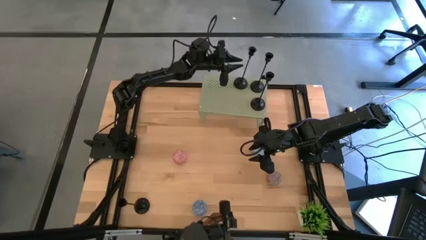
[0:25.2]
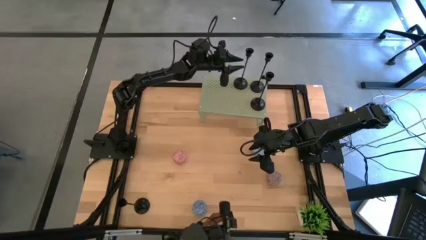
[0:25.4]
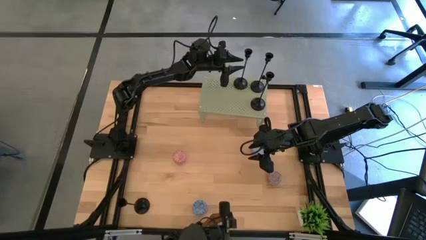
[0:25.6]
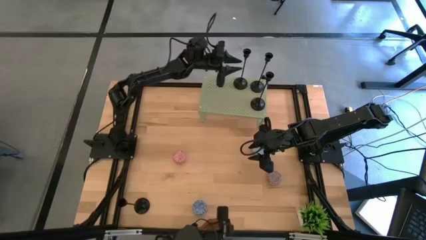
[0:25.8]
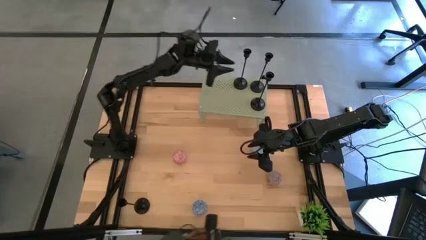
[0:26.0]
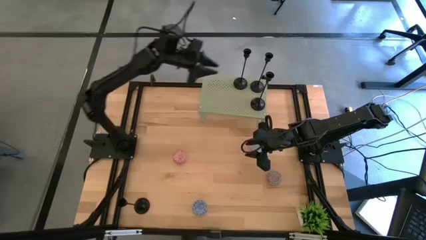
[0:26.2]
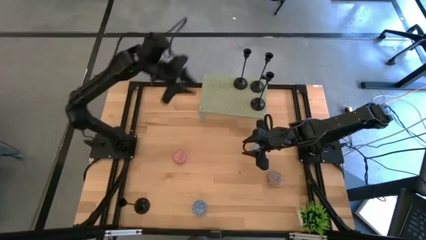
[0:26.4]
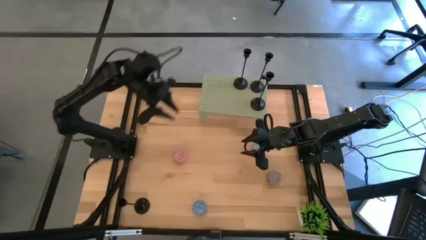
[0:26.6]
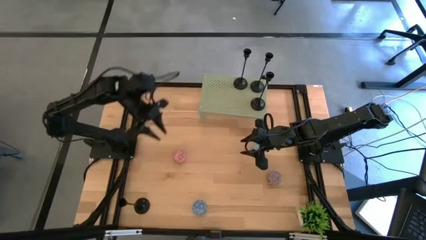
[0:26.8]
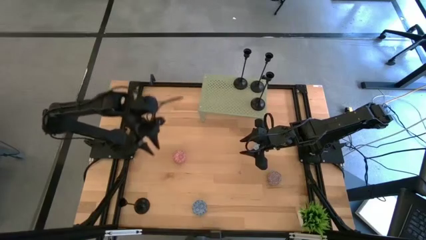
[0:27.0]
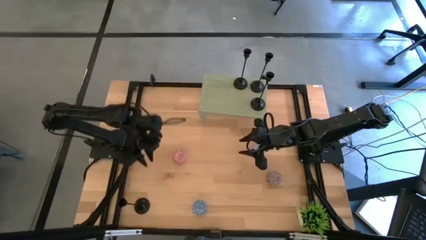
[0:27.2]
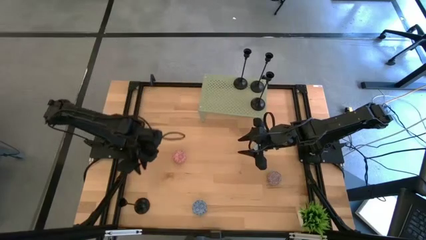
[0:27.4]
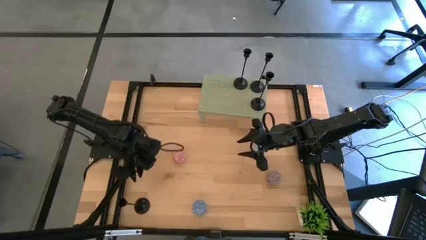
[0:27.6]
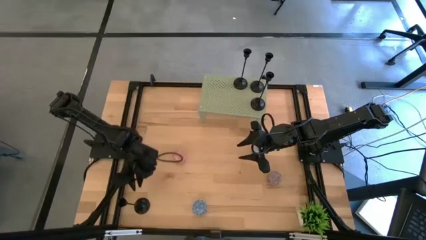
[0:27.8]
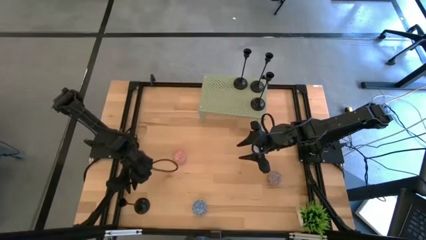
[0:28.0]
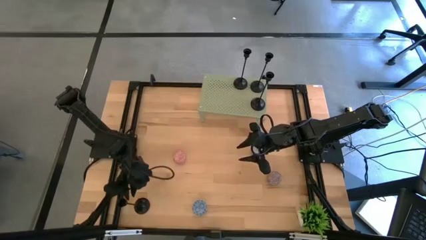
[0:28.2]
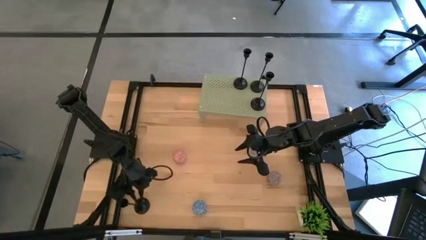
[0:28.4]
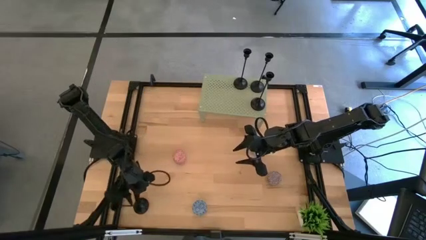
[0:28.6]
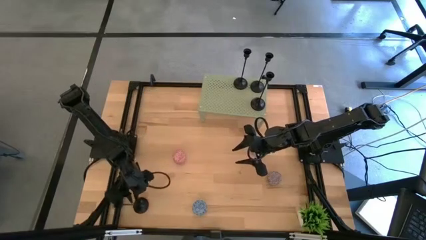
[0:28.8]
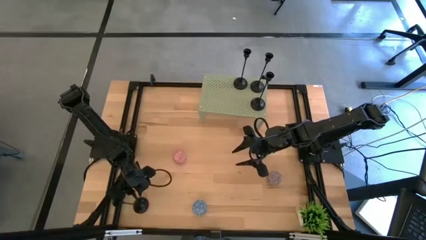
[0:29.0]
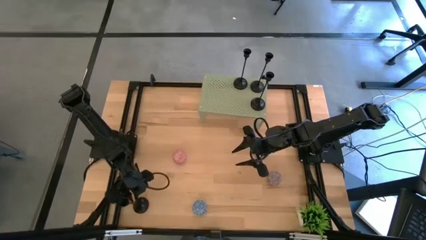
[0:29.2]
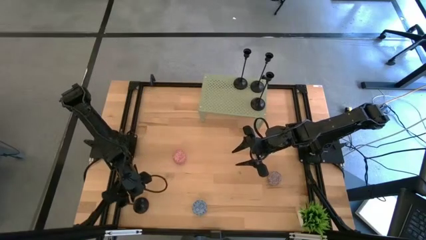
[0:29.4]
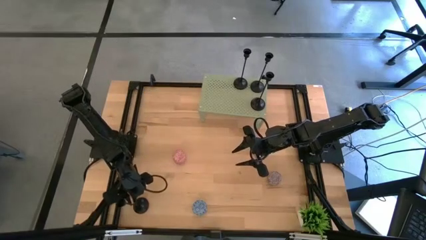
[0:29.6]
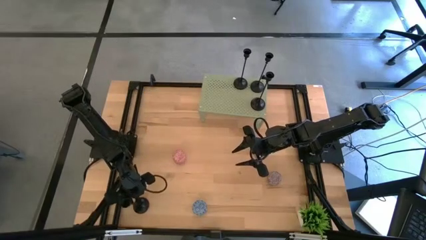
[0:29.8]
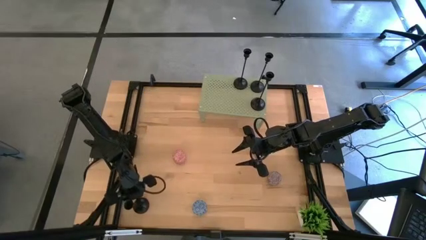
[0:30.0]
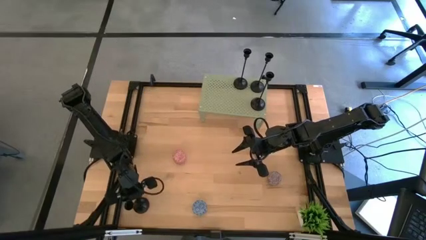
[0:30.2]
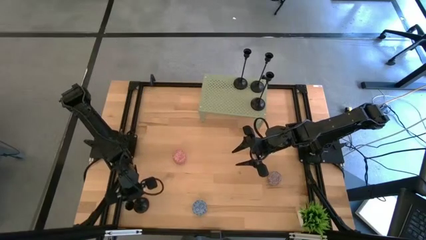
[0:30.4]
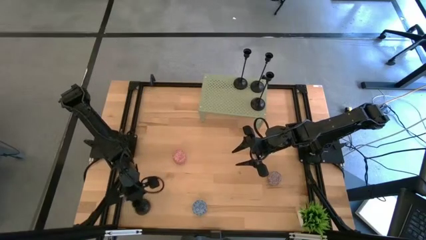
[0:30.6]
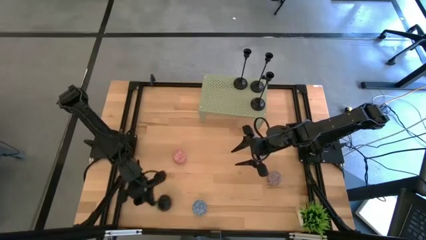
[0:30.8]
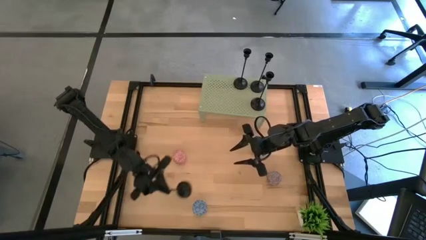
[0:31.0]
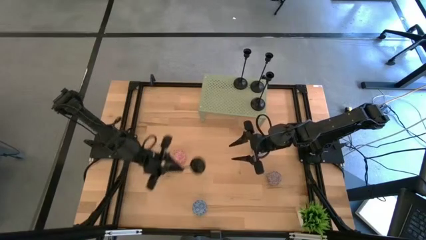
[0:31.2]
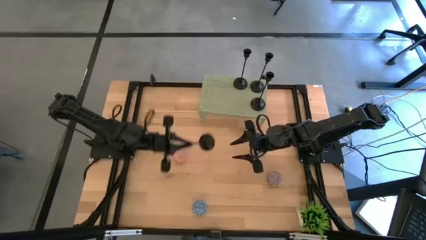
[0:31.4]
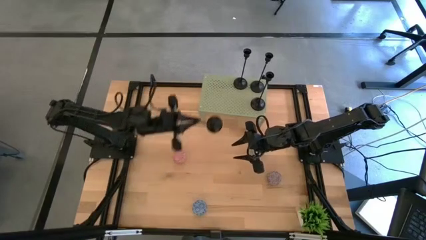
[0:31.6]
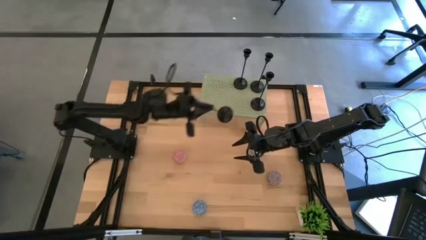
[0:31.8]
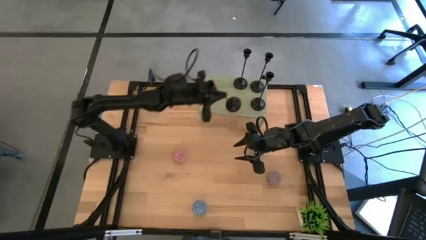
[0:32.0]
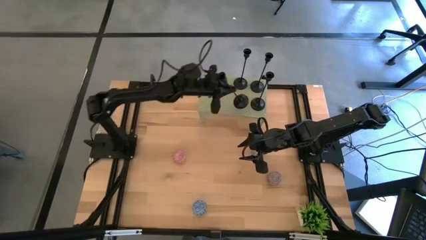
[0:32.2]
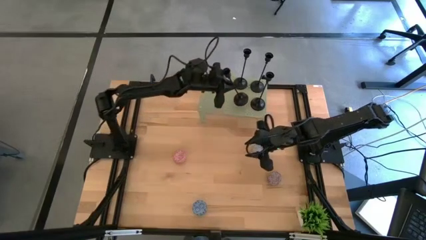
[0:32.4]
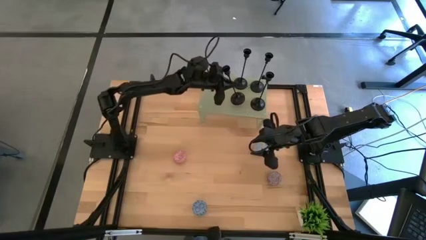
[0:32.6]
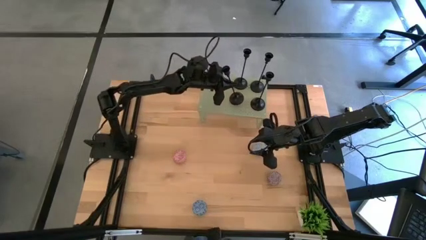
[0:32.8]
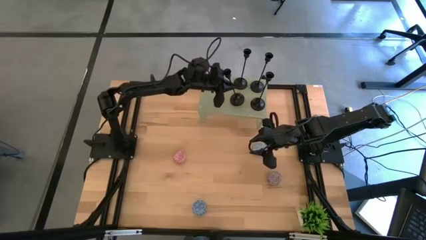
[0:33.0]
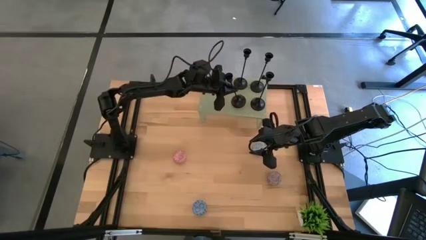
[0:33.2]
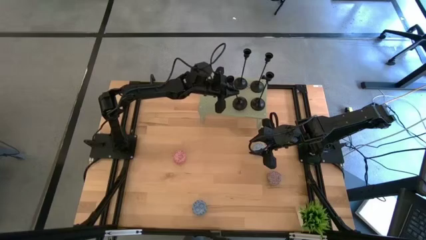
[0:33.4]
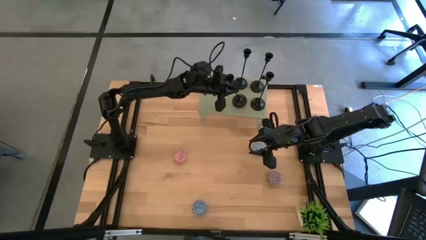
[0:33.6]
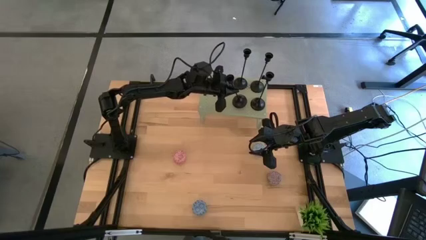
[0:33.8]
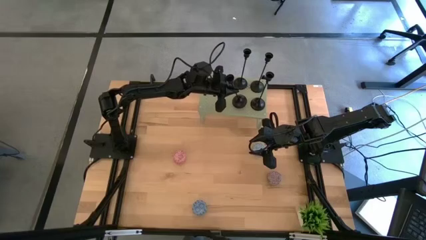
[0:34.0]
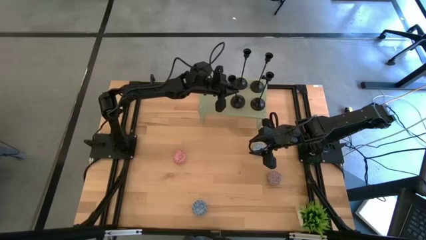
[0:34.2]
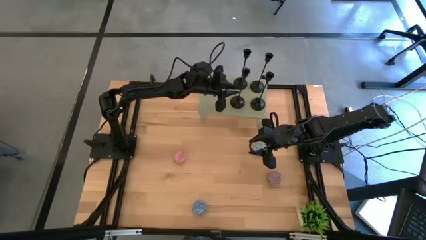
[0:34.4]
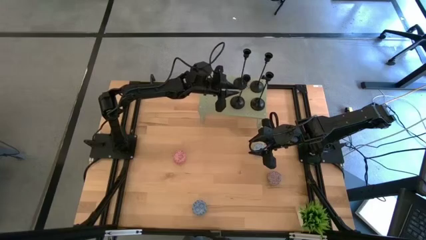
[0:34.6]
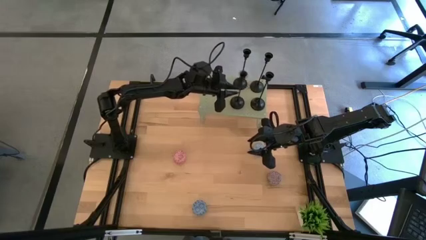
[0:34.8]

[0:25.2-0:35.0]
Task: Pick & Place candle stick holders
Put the black candle holder on the shelf aligned with the other black candle holder

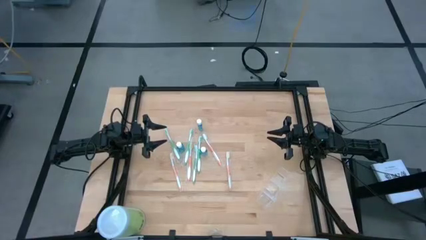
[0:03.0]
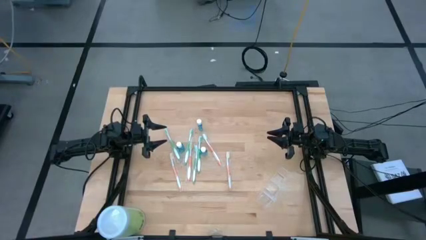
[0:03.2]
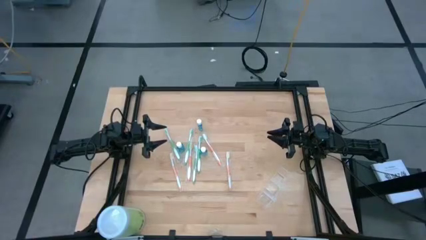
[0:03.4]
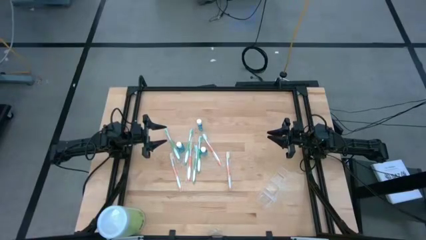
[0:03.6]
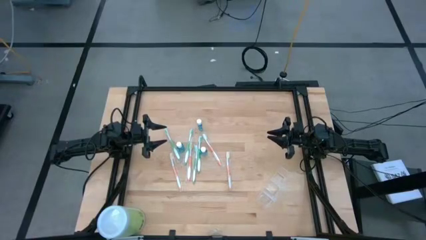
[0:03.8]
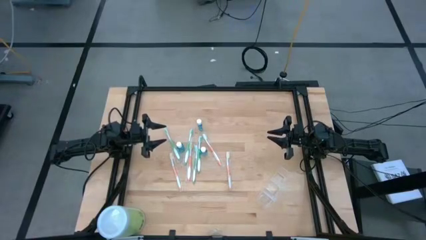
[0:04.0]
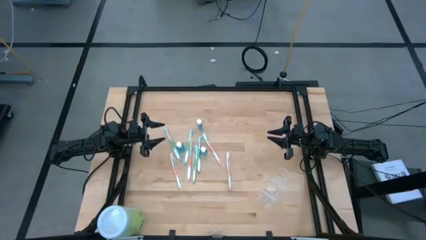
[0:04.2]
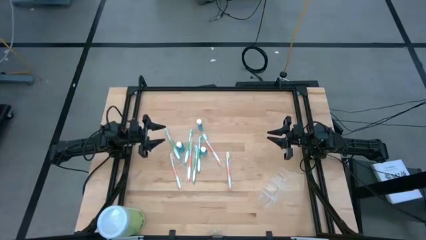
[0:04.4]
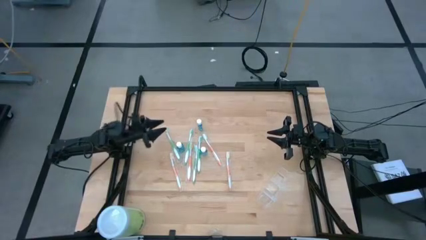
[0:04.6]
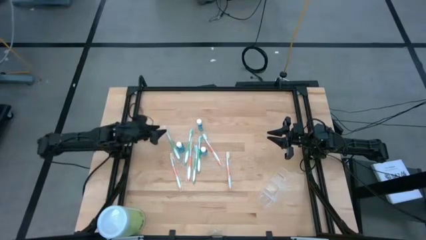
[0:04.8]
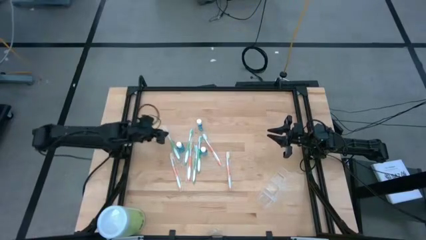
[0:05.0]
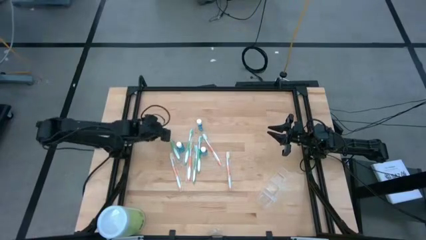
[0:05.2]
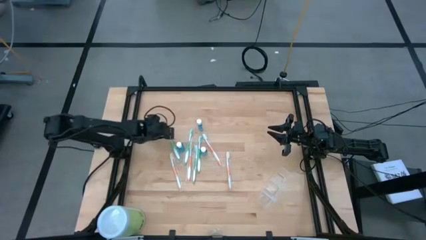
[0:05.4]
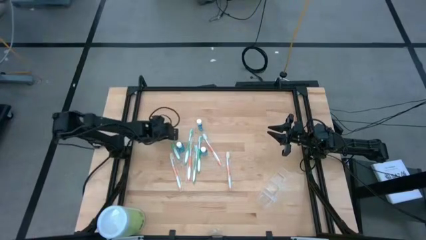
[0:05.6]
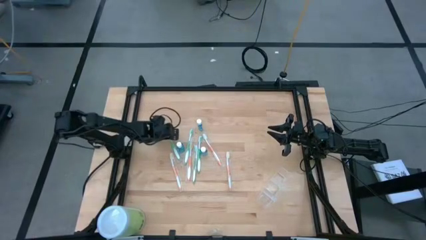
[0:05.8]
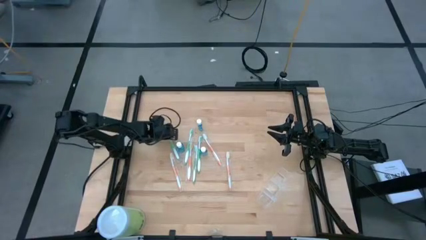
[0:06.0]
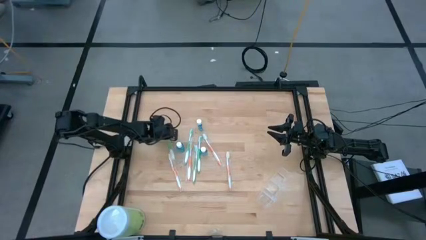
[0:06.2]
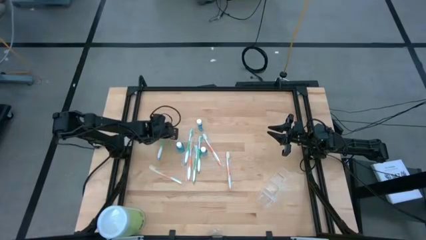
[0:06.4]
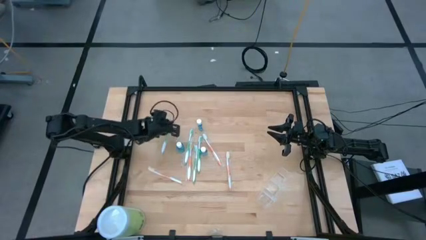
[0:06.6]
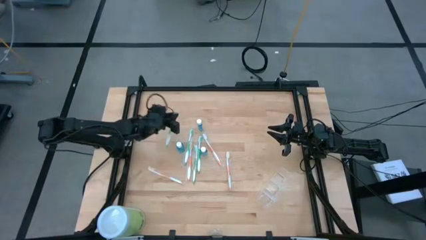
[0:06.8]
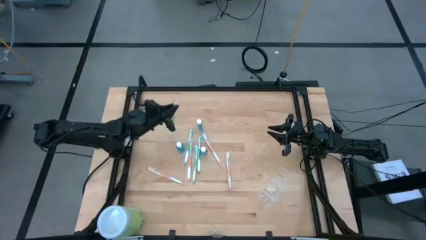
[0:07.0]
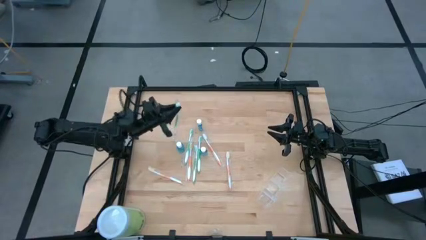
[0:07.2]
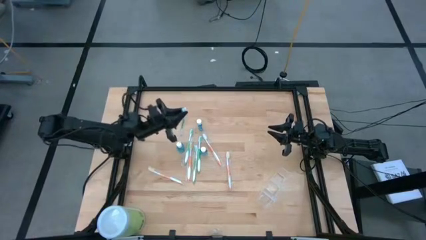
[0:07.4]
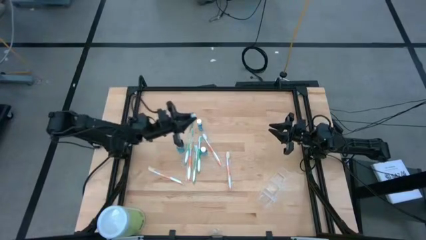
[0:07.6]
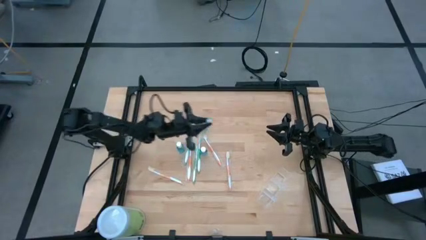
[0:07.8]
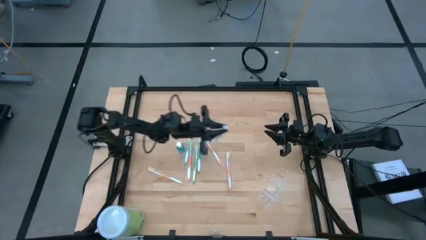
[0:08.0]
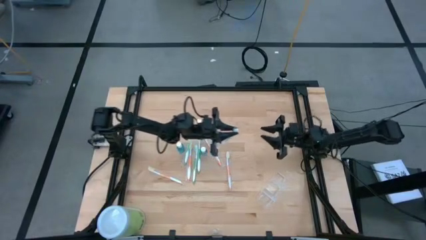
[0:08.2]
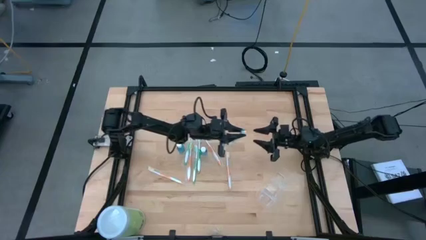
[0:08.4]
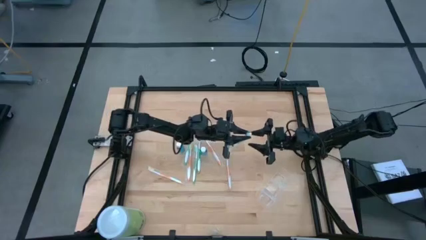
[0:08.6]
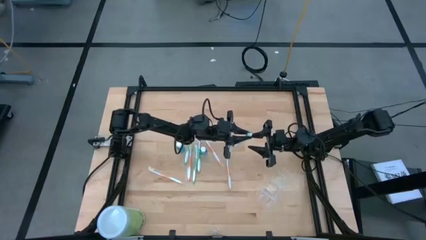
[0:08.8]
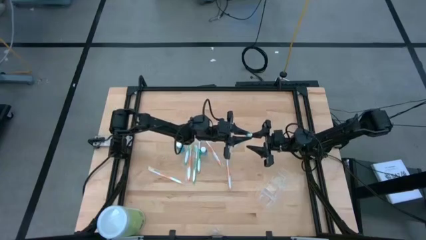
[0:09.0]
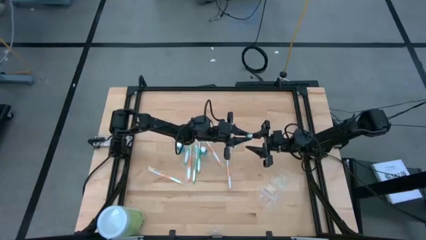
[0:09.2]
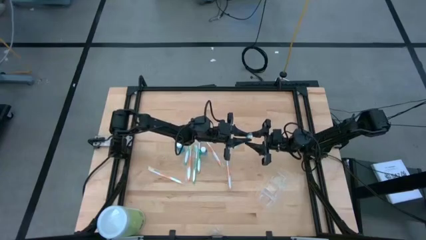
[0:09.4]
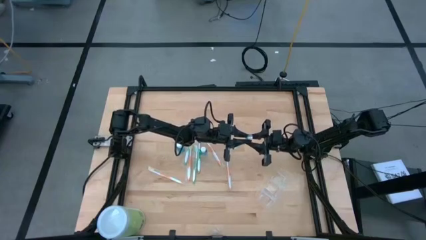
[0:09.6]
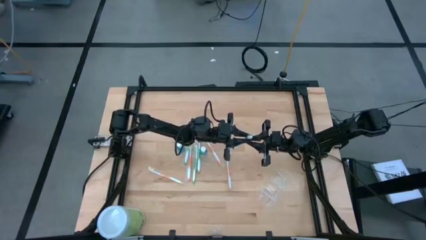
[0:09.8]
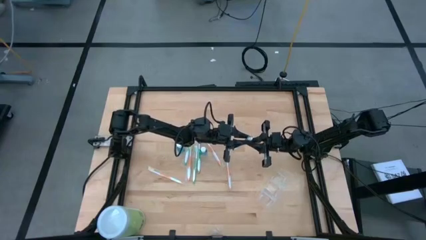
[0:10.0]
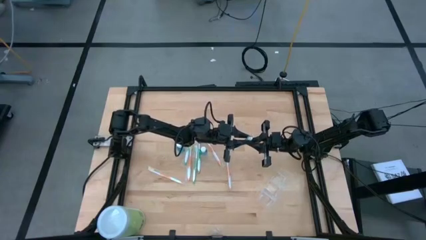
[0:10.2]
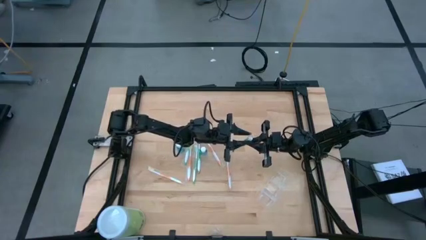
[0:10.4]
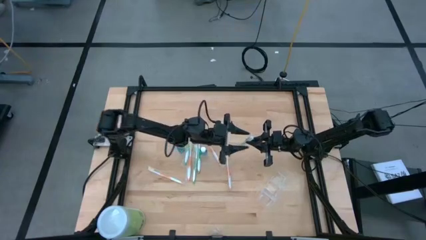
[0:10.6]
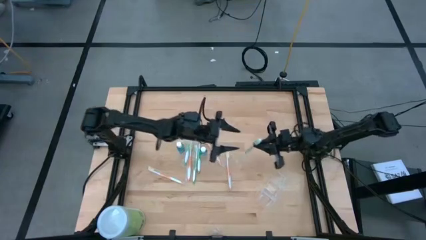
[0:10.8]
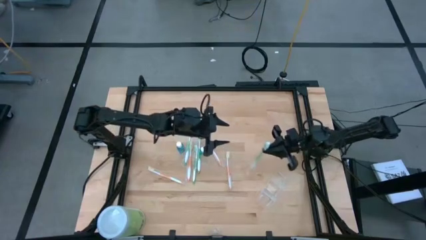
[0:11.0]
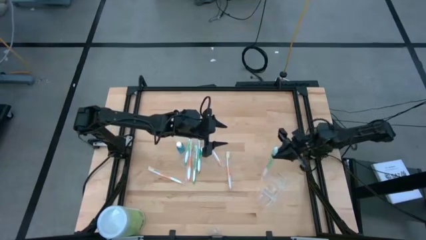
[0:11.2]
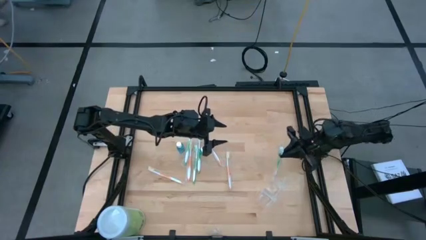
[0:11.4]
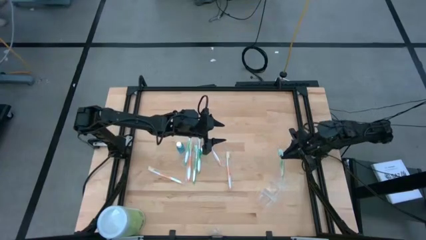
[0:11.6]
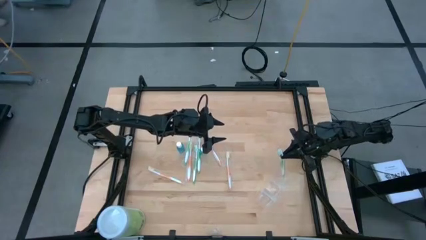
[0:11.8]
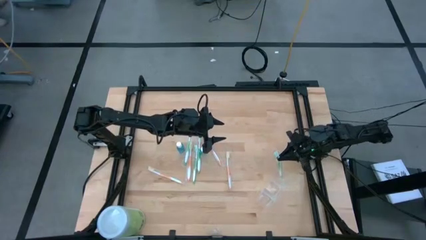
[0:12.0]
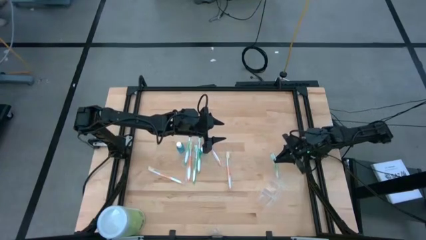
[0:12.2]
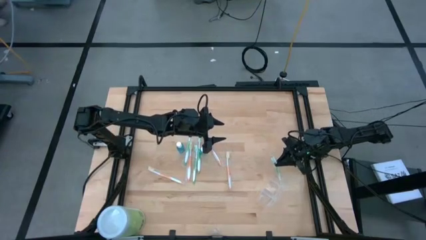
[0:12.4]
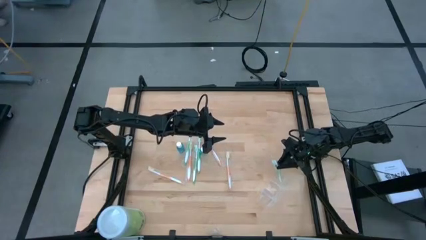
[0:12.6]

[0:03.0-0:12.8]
Task: Pick & Place toothbrushing station
Put the green toothbrush into the top section of the transparent organizer
